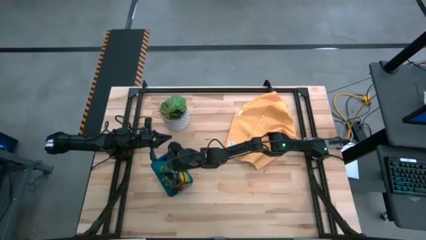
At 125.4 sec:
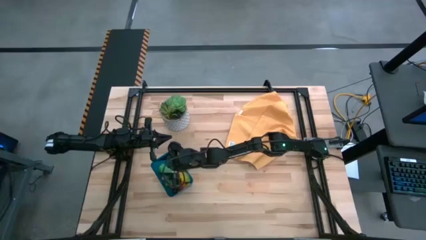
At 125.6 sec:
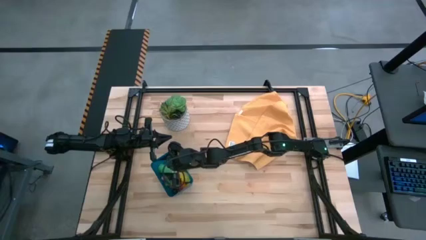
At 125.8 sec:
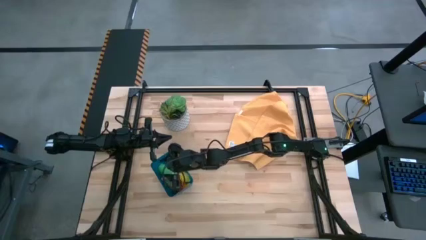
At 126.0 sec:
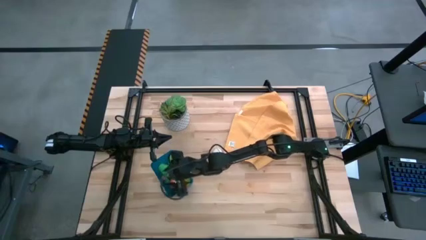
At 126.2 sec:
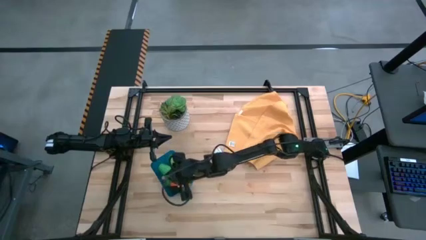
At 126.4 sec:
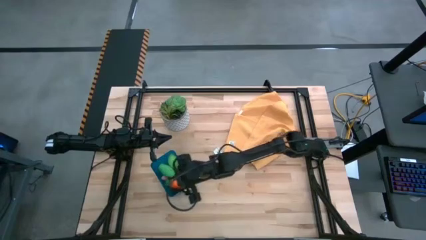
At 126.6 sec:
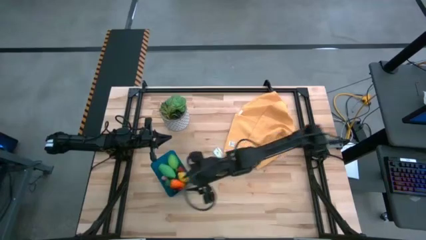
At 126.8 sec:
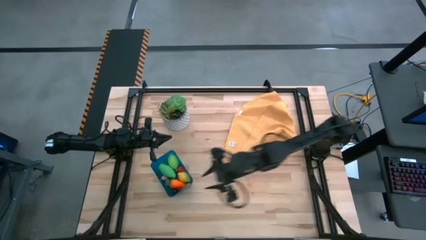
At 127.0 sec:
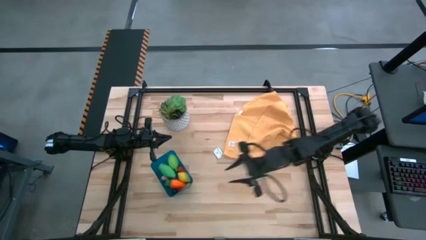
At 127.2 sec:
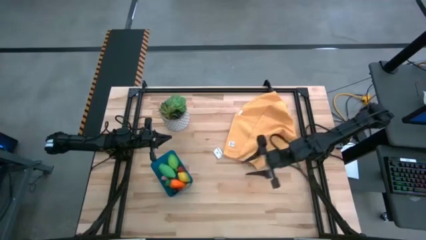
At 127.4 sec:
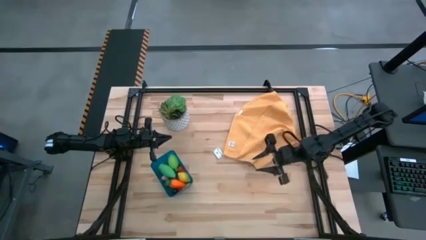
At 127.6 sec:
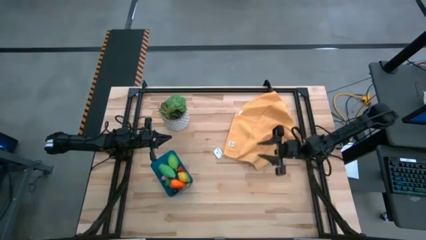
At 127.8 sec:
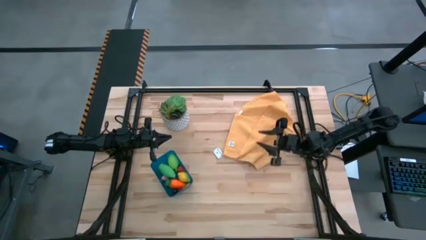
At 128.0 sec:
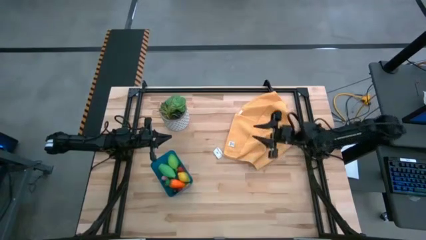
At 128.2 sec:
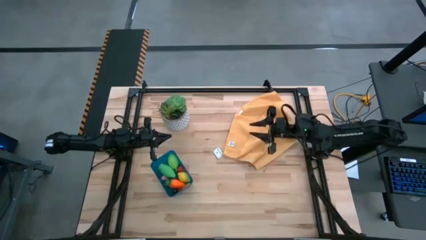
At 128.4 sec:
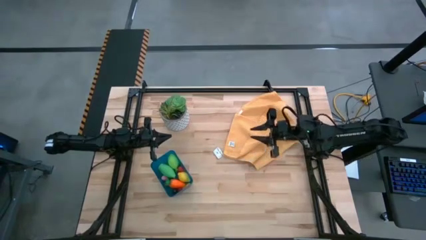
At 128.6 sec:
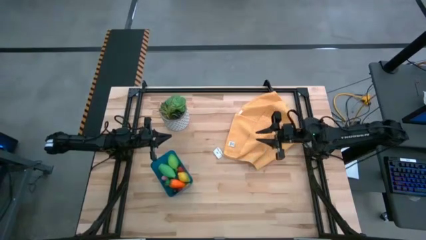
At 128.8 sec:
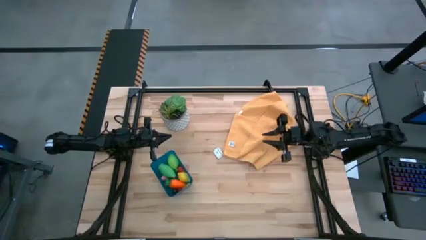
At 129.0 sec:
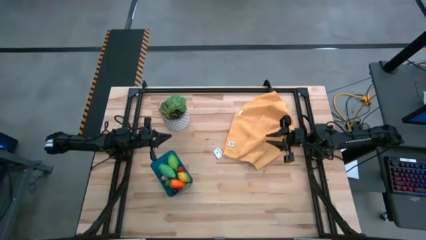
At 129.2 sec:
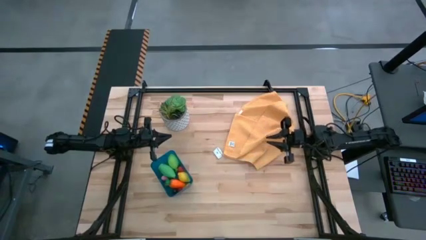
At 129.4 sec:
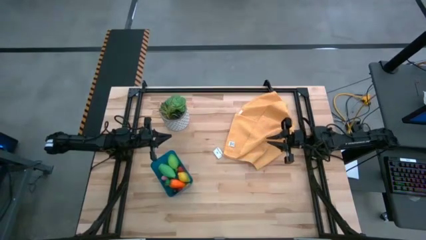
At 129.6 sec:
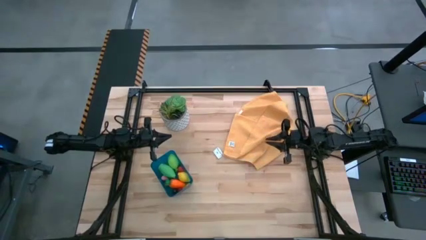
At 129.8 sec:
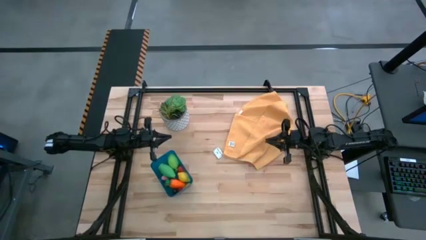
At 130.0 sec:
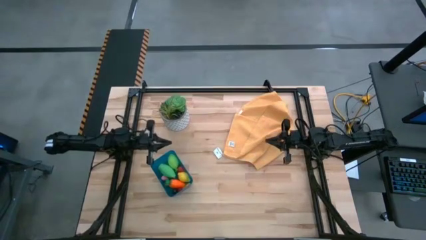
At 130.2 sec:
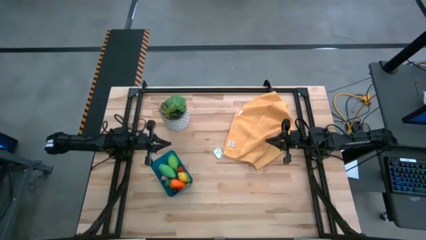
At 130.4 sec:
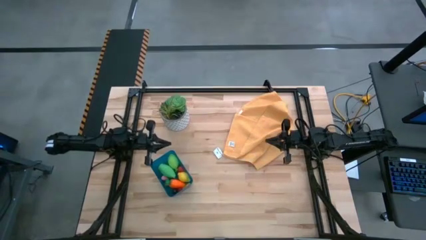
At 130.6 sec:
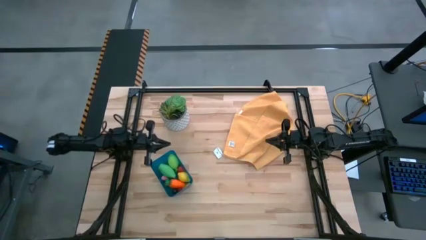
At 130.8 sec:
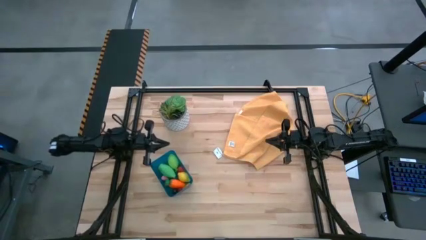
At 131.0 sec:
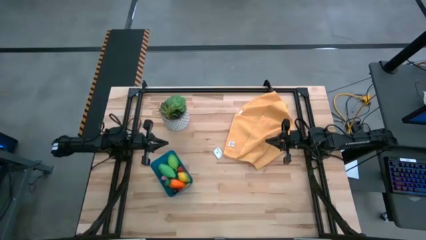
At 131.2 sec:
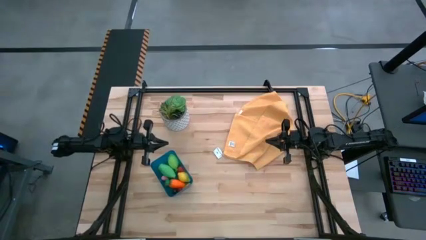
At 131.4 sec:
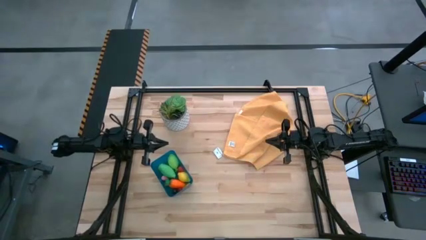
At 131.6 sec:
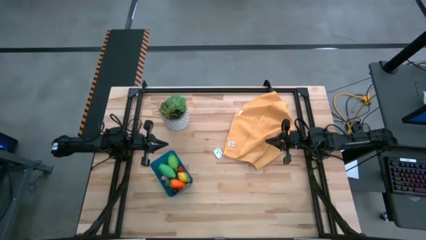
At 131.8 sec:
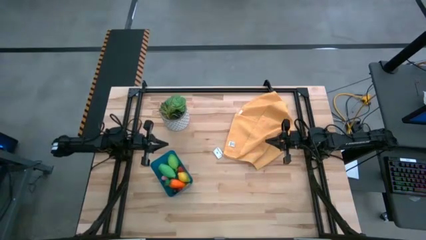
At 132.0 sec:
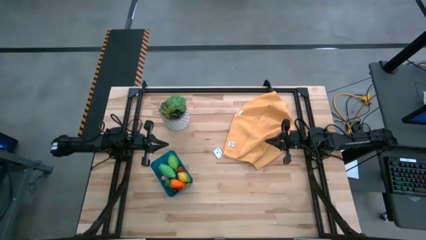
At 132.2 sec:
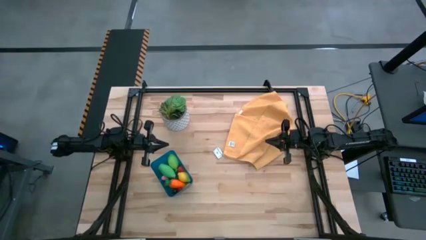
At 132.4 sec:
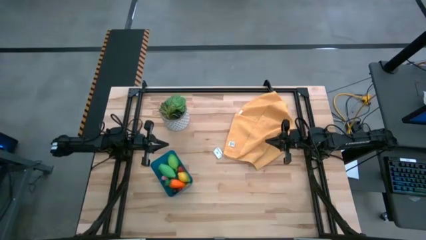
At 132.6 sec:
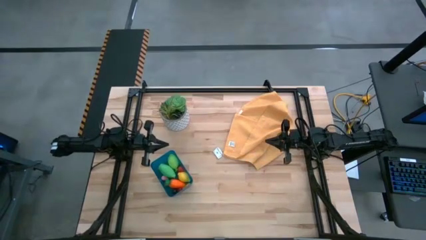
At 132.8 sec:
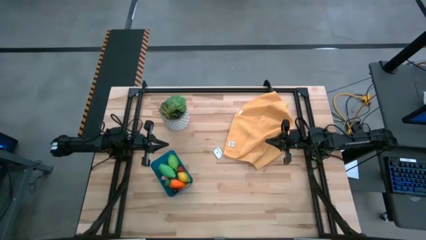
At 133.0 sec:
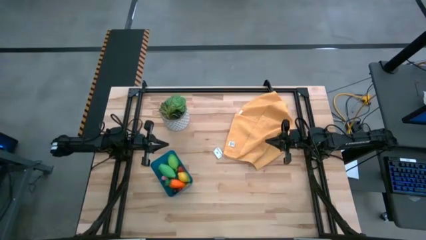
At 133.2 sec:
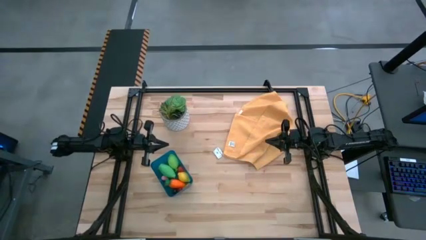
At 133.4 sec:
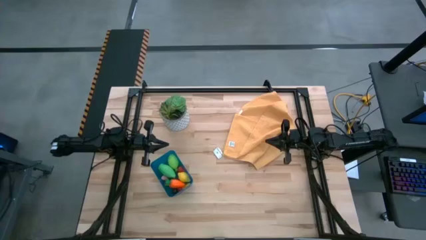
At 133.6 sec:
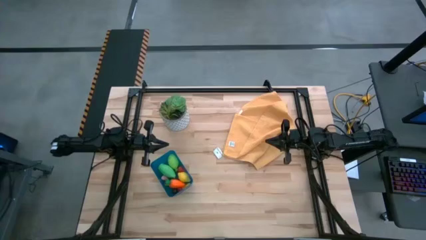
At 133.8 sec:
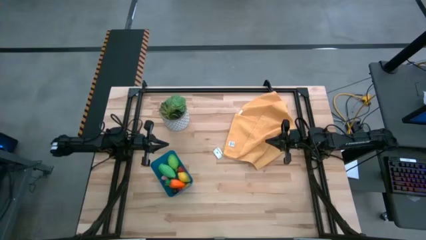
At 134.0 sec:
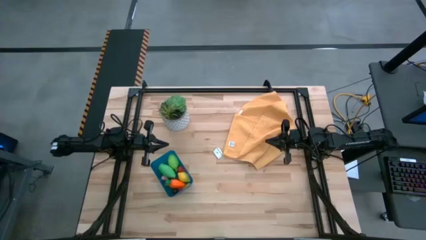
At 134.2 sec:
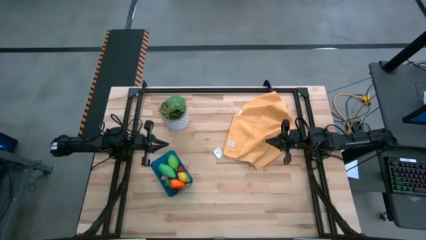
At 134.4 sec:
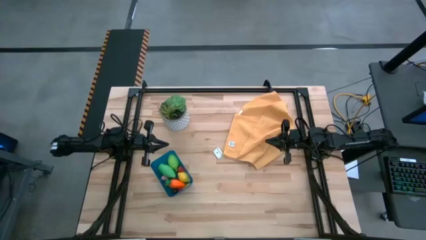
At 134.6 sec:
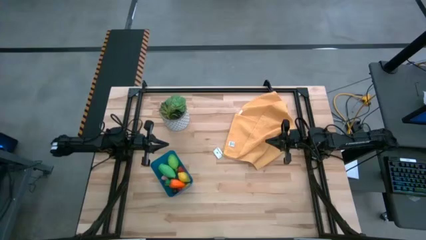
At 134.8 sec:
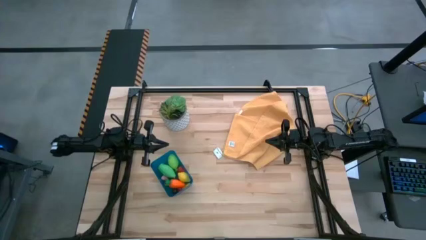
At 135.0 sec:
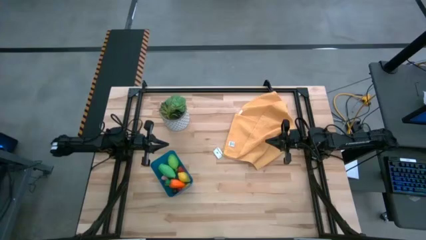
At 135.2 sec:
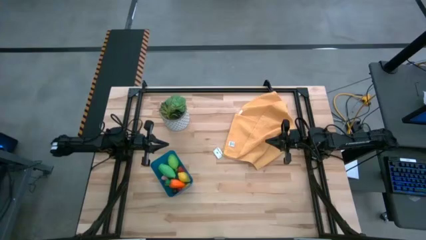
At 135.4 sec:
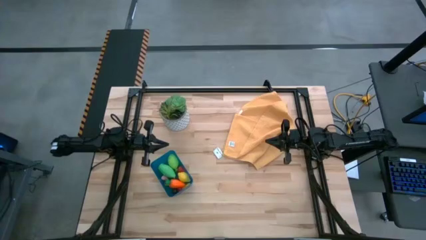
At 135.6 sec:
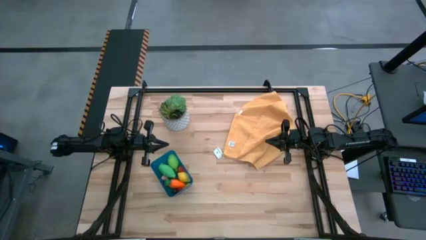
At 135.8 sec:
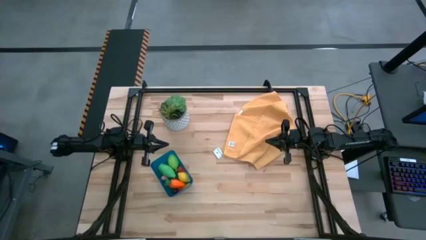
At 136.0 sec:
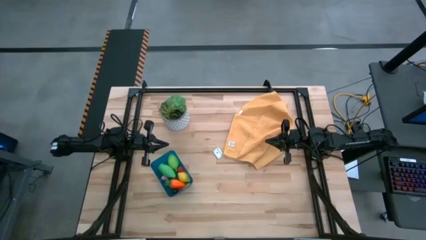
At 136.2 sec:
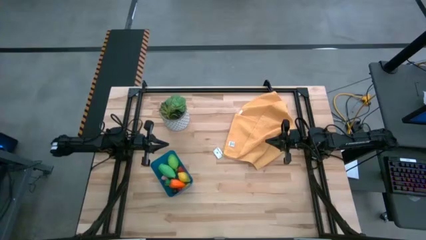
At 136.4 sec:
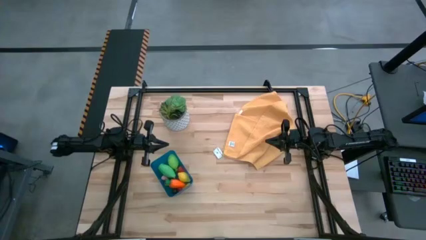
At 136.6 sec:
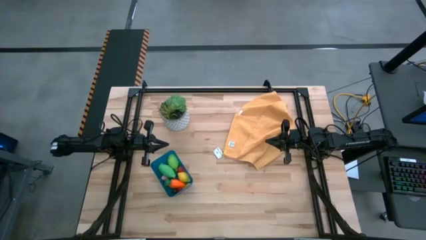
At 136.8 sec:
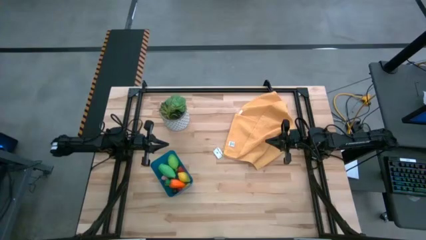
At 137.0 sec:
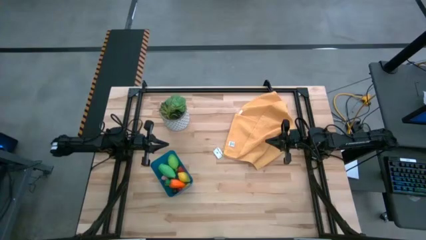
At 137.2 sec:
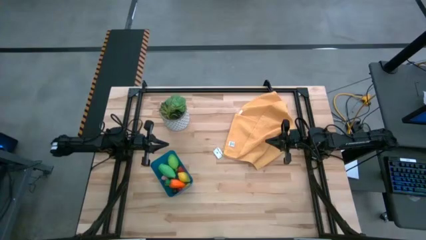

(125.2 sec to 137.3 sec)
Task: Pick and placing Produce into tupperware
Return to Home Position

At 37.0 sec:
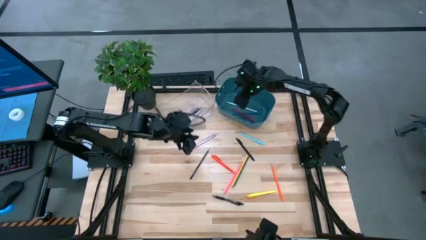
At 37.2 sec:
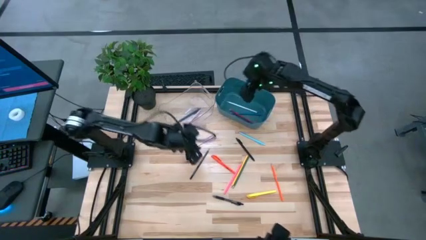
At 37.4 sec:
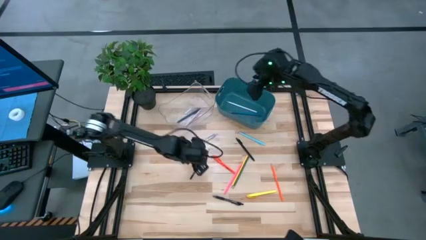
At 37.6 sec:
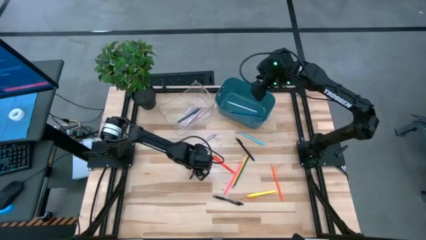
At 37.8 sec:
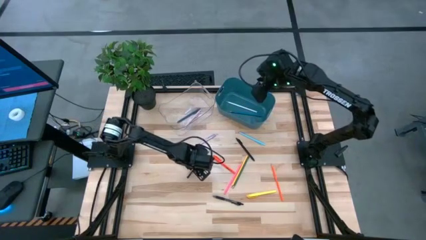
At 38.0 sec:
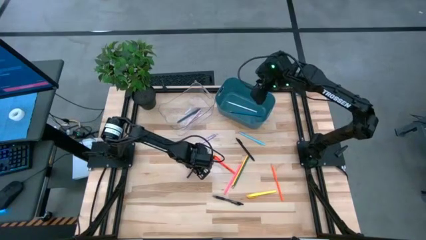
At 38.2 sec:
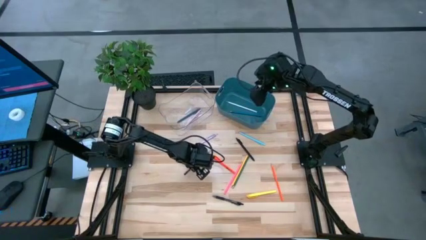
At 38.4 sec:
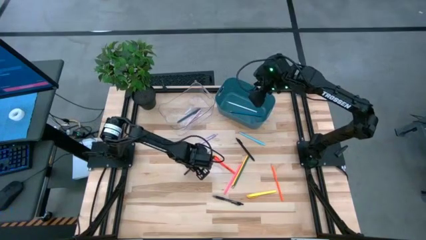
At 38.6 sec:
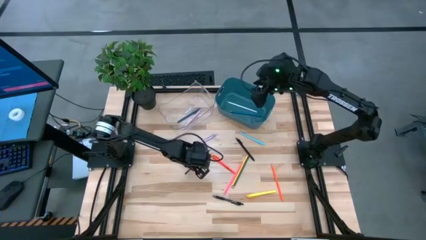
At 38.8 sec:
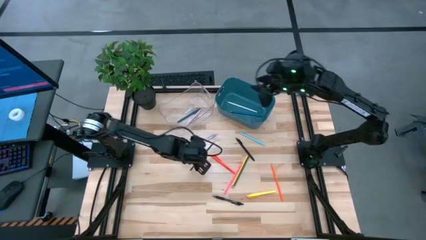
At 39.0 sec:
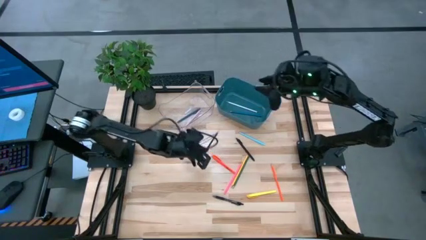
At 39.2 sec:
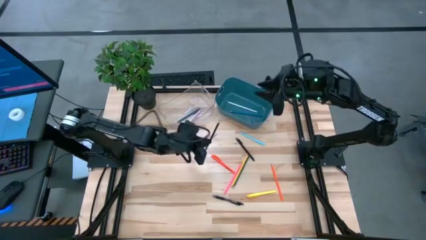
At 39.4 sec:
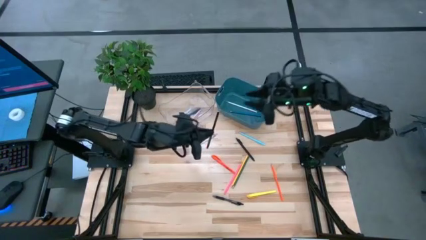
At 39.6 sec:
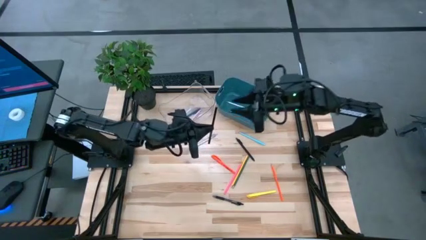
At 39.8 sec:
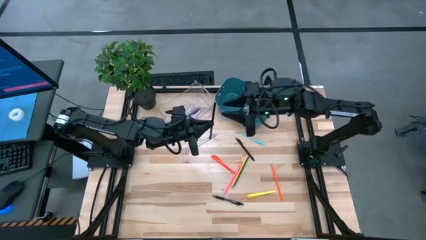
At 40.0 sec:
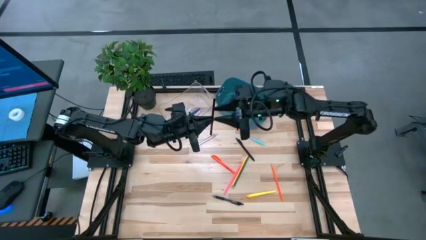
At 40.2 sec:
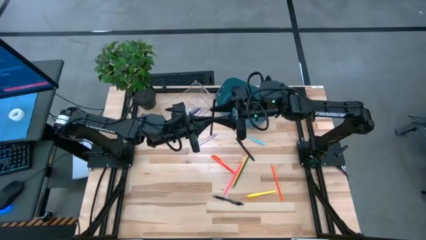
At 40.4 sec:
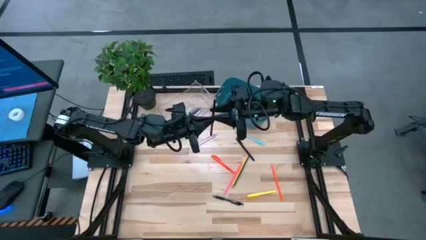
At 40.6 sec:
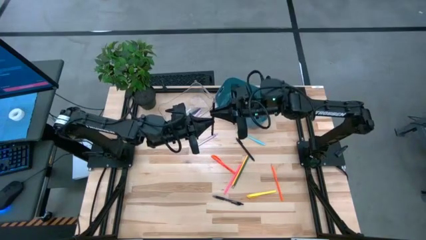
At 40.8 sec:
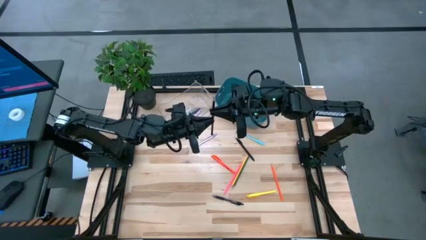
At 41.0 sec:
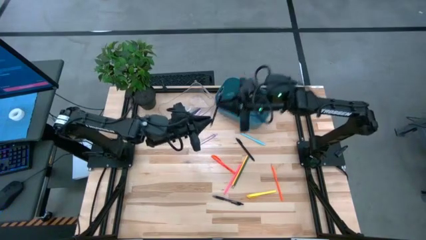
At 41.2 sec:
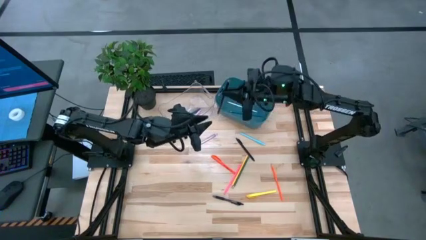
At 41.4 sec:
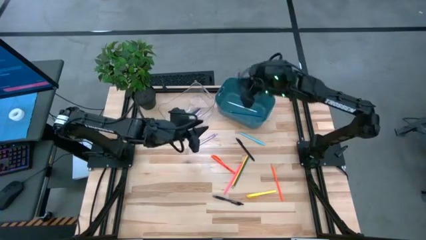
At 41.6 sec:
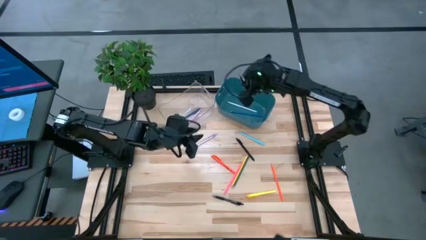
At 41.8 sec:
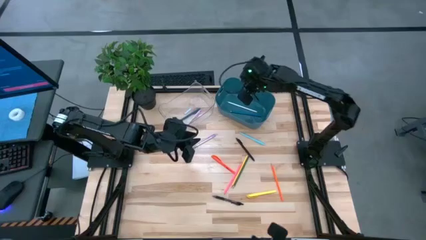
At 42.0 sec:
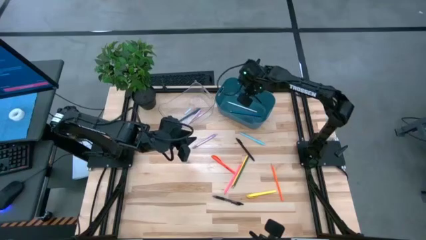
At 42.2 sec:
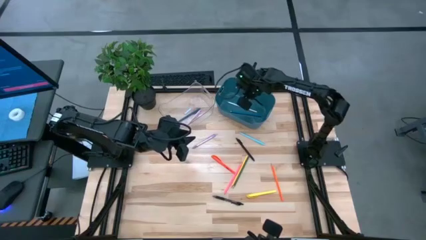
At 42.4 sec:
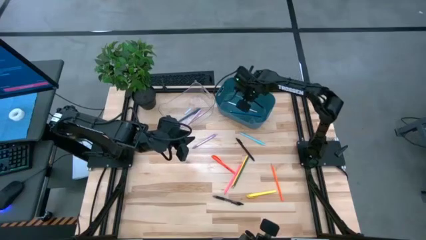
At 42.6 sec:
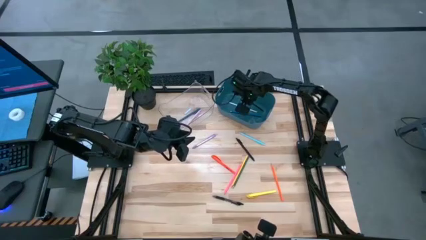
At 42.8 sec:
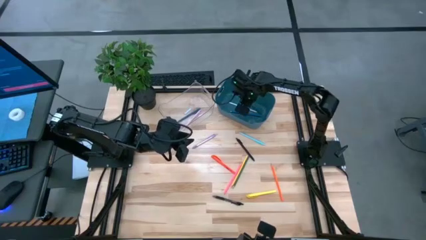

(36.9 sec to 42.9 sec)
Task: Sort pens & pencils
Put the black colored pencil into the blue bin
